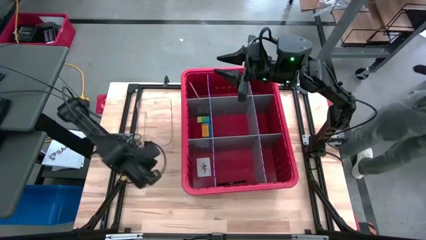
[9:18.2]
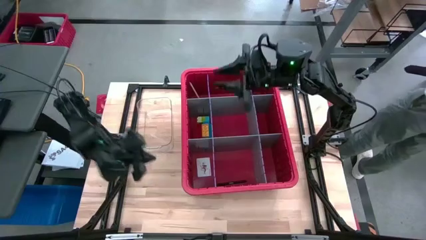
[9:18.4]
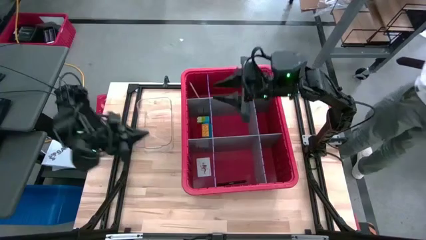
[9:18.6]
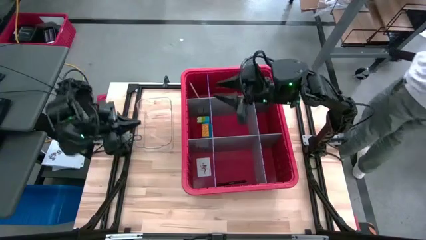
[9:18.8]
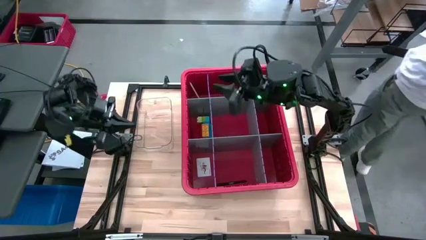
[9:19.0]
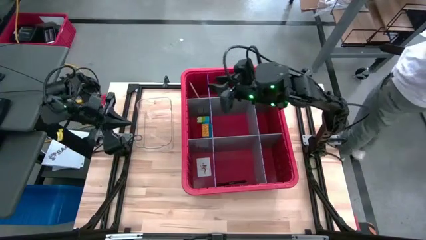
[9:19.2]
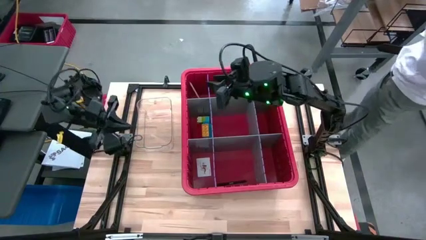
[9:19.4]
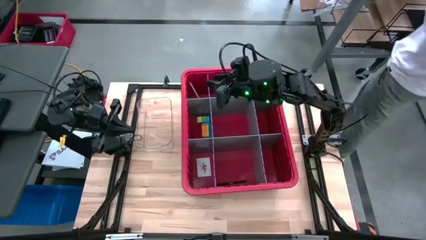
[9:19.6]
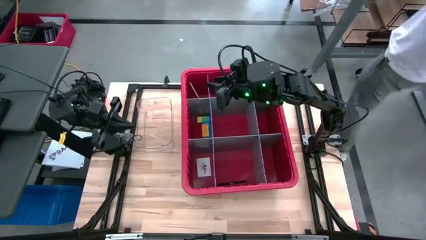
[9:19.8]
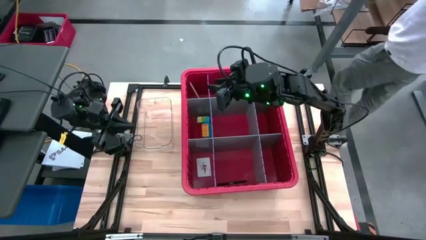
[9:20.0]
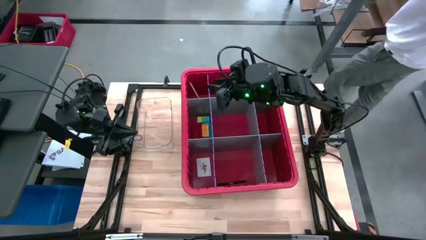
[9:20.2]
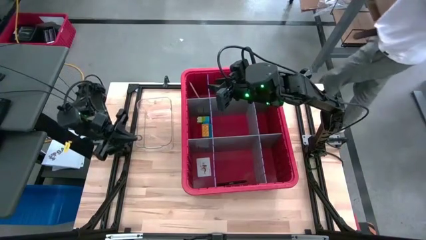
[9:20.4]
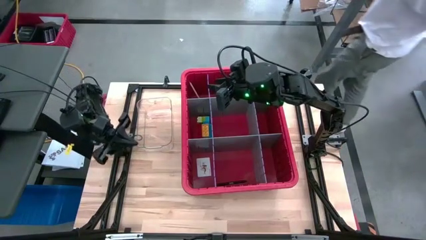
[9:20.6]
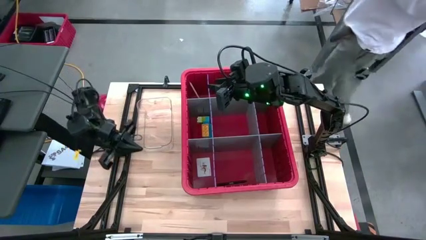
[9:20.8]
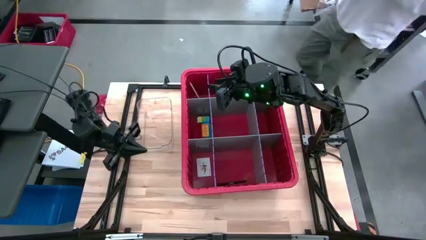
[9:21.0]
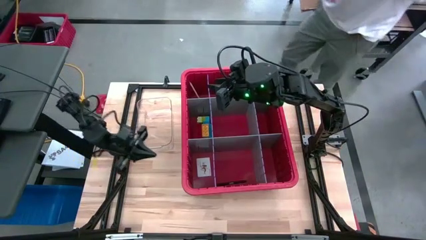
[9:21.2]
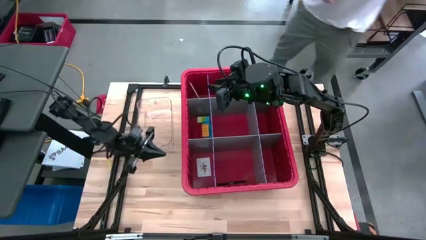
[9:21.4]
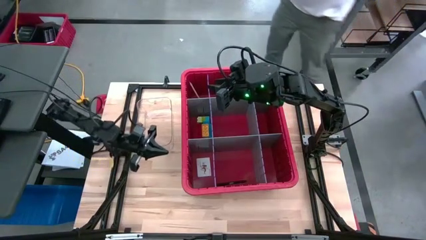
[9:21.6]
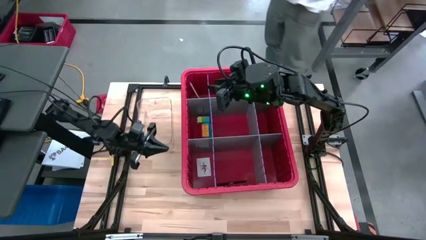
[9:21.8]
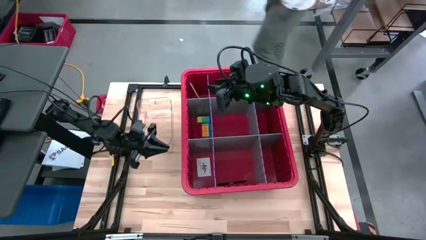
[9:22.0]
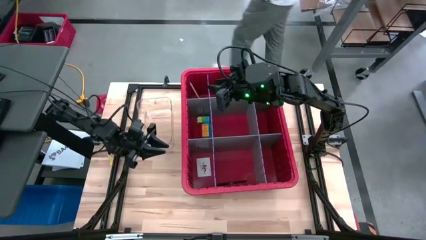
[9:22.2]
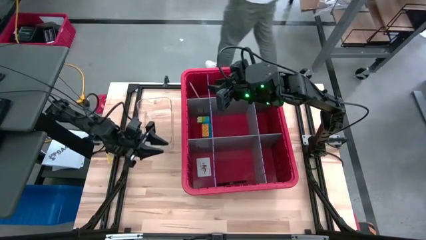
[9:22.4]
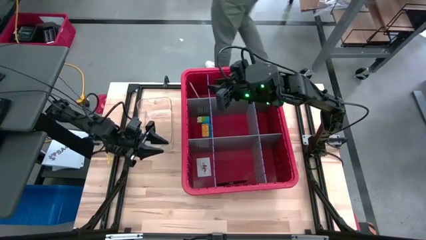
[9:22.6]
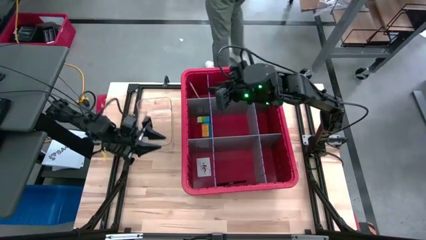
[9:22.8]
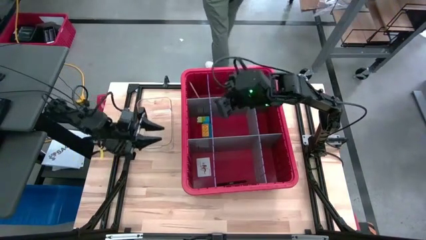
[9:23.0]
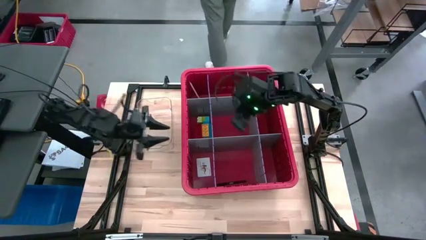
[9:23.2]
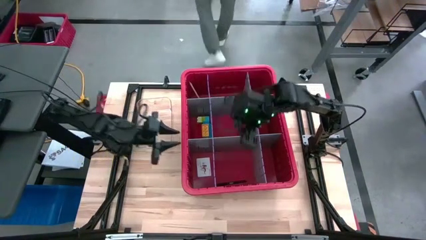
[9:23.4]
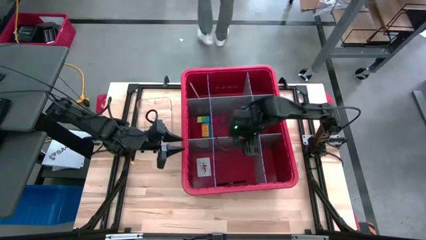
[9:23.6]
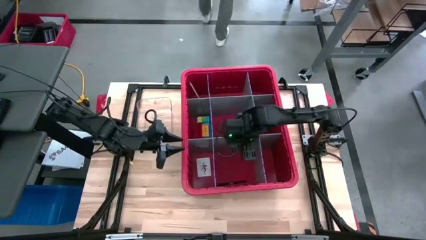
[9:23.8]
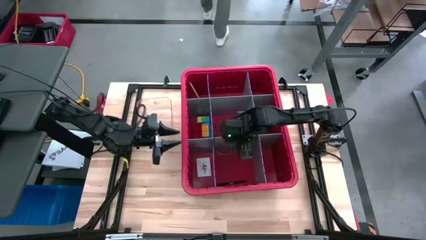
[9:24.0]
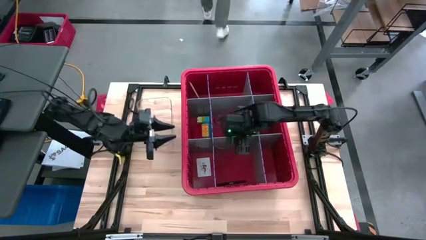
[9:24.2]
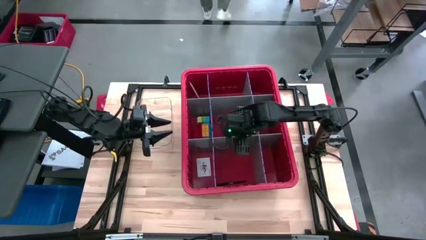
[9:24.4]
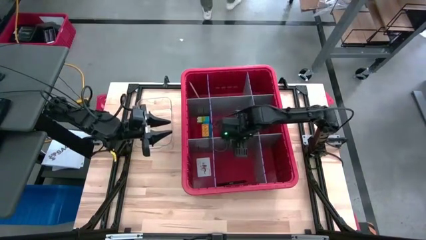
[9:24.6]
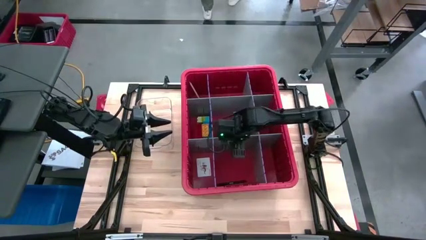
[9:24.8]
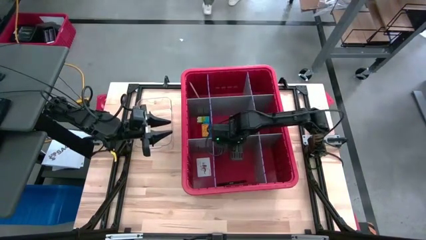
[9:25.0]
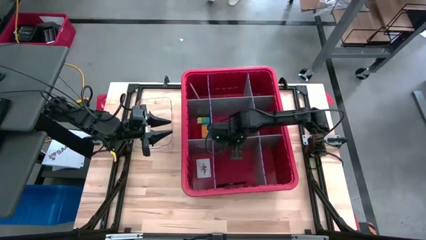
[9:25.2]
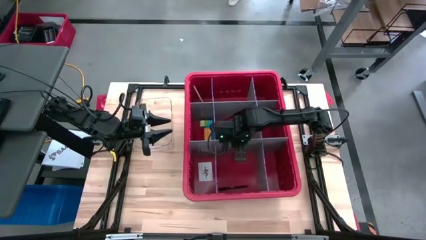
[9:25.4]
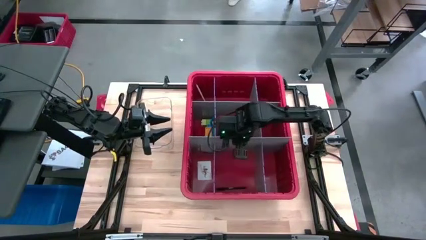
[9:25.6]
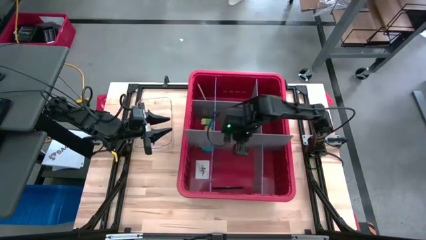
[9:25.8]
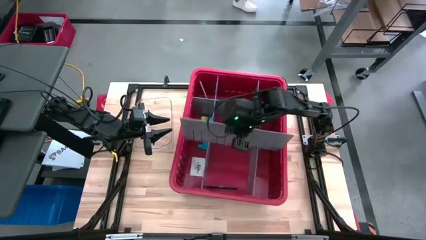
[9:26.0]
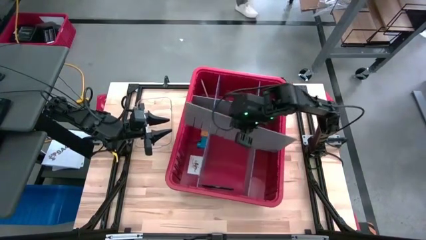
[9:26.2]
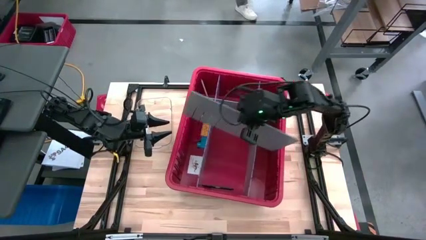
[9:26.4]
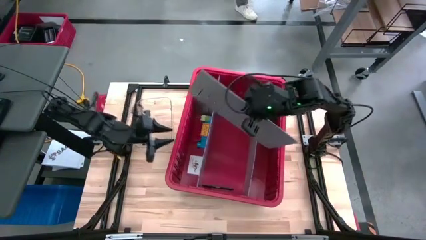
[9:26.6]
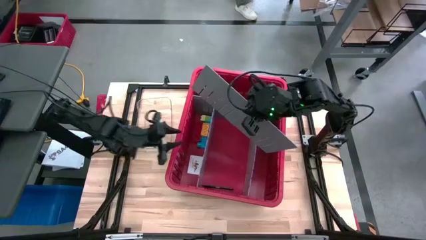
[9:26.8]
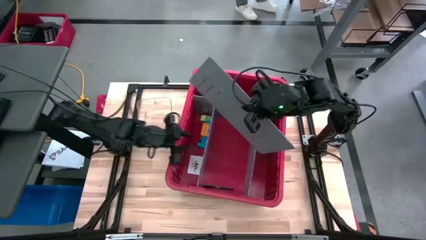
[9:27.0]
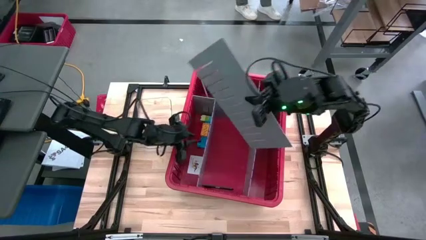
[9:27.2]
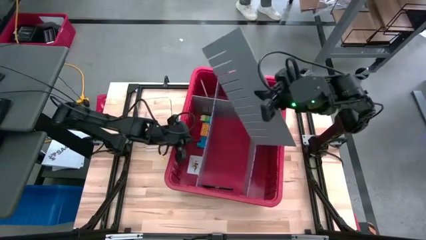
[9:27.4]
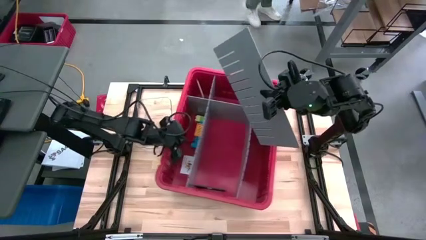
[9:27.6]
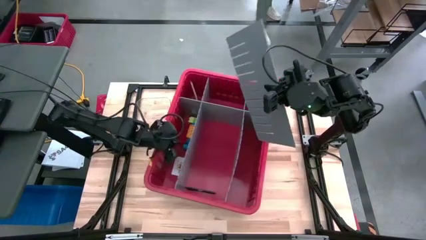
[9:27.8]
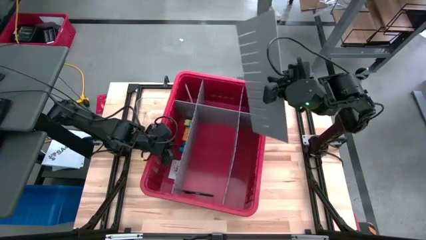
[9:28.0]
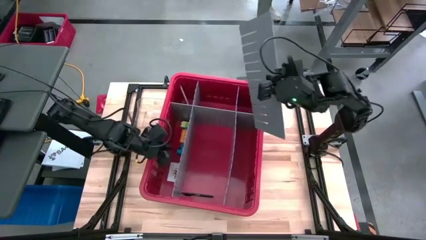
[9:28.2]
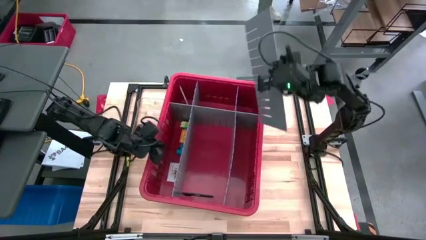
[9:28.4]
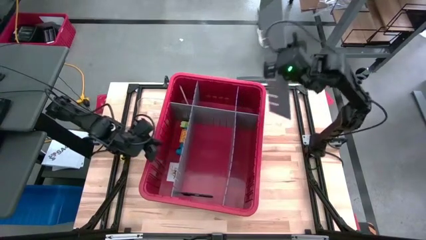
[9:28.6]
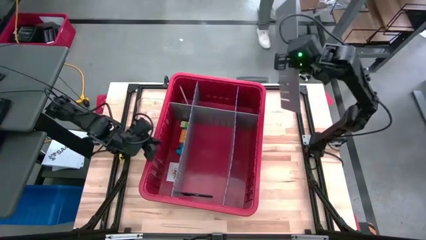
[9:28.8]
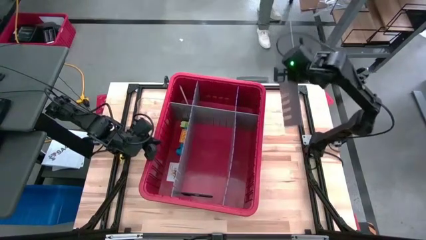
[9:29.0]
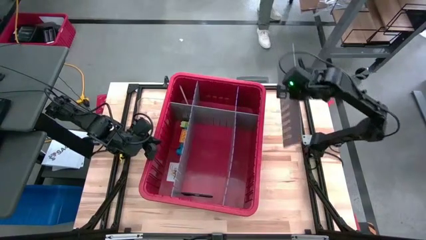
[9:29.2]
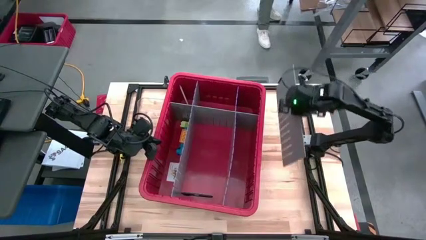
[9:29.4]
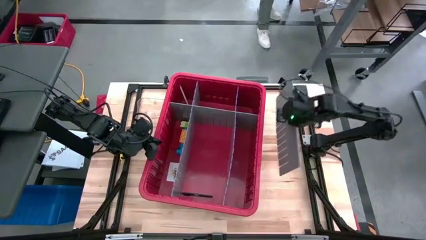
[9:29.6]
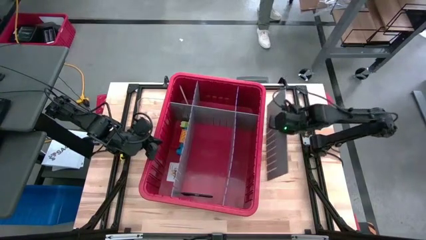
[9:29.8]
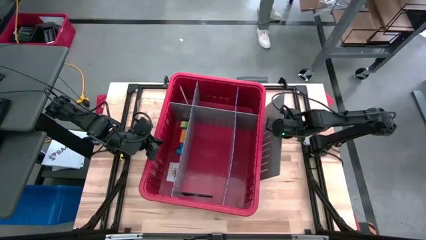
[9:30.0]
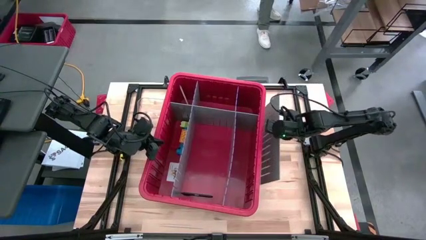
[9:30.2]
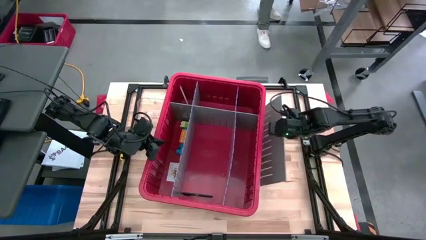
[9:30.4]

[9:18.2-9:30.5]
Task: Sort blocks
Break down the bin divider

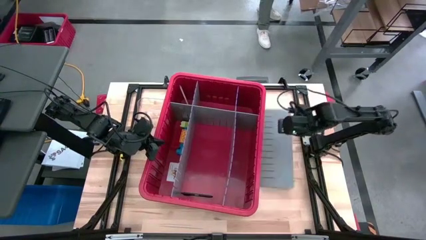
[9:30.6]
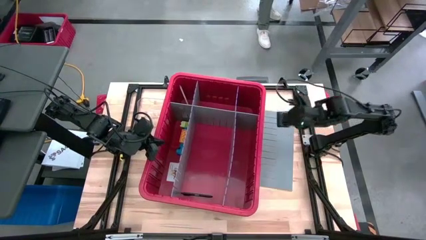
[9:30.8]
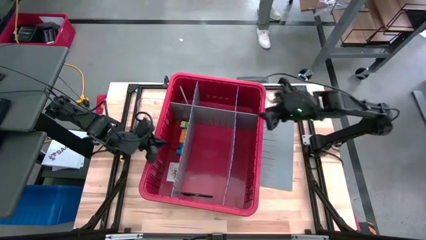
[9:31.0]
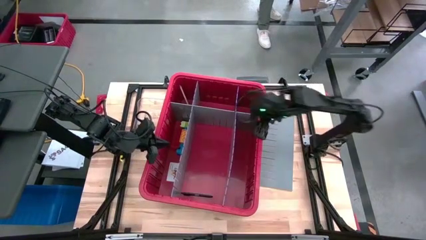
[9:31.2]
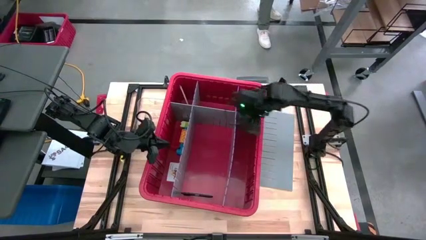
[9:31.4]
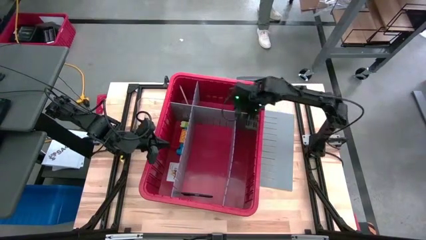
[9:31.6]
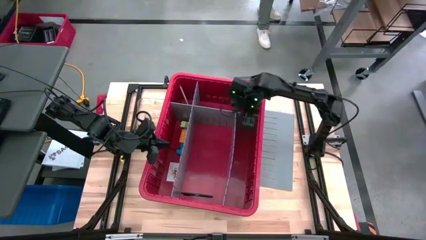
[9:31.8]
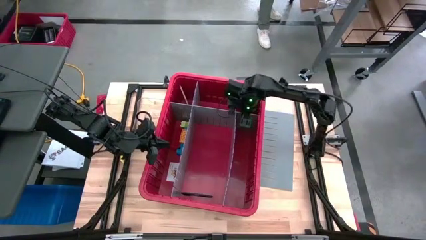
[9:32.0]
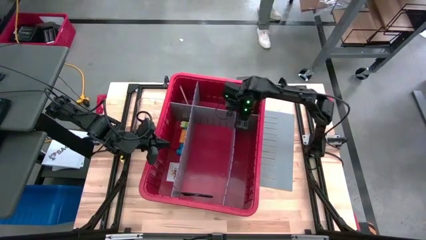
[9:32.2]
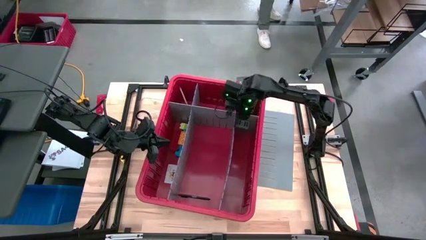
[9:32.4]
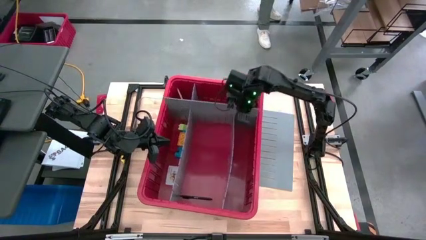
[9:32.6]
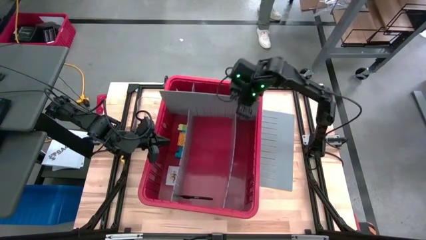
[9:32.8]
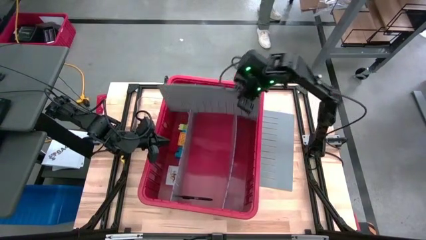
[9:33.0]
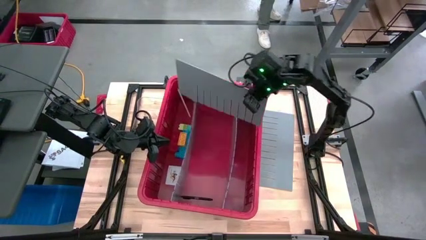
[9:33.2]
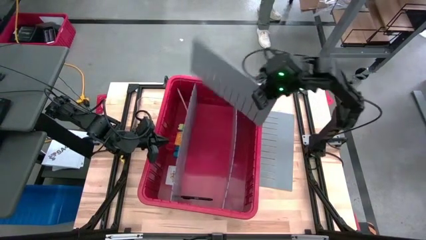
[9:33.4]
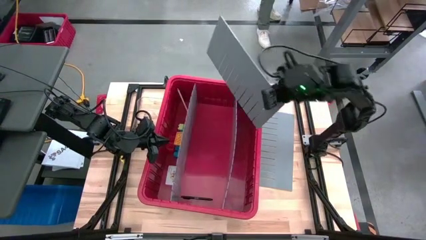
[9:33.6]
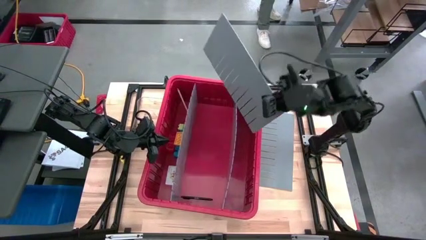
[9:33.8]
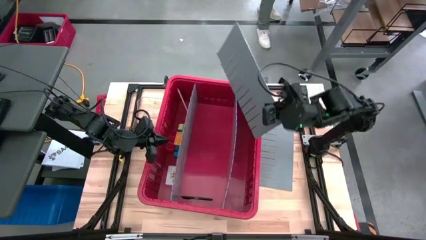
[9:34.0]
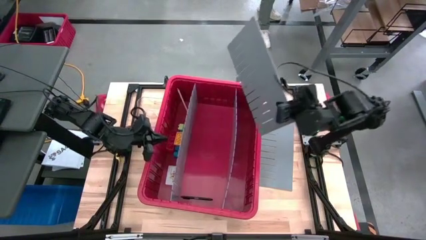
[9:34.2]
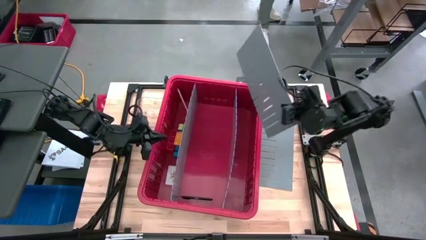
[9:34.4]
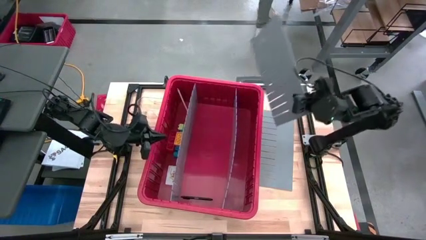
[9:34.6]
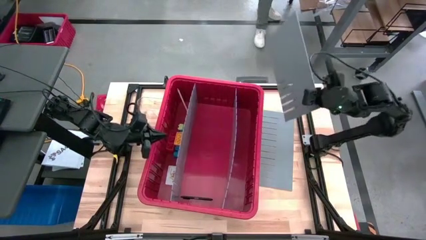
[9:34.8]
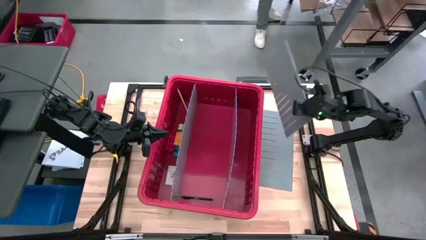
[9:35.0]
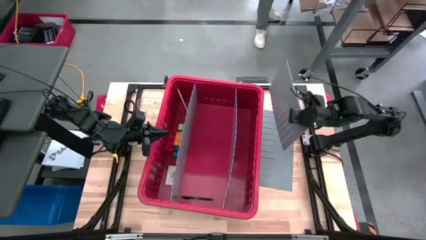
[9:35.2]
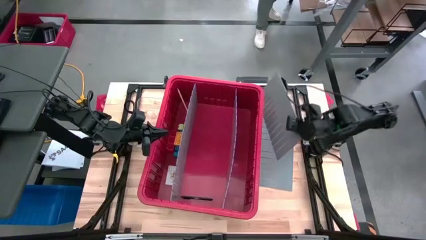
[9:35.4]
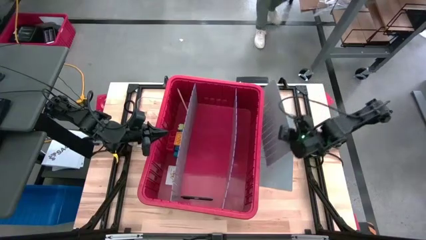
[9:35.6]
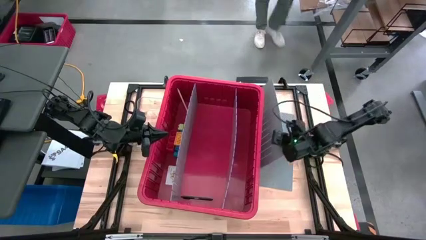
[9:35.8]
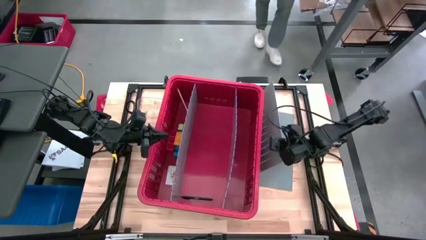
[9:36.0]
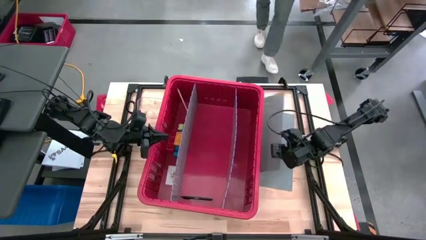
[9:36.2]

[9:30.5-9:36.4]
Break down the bin divider
